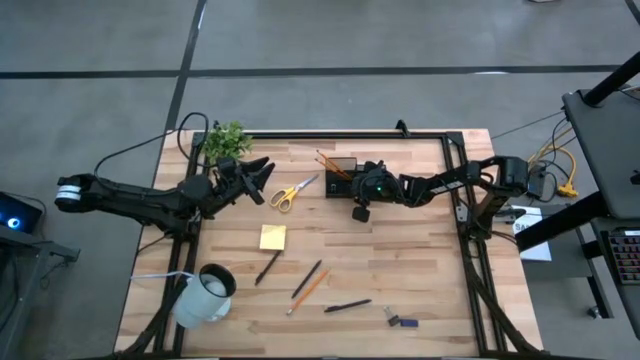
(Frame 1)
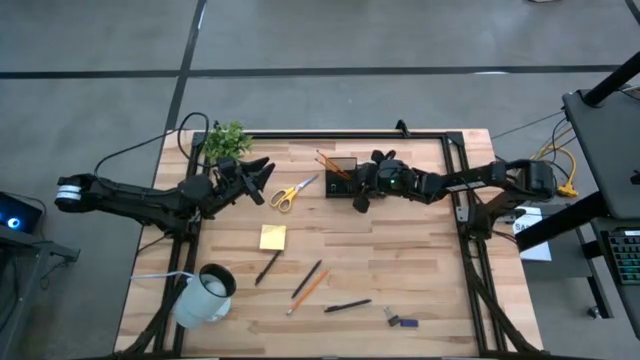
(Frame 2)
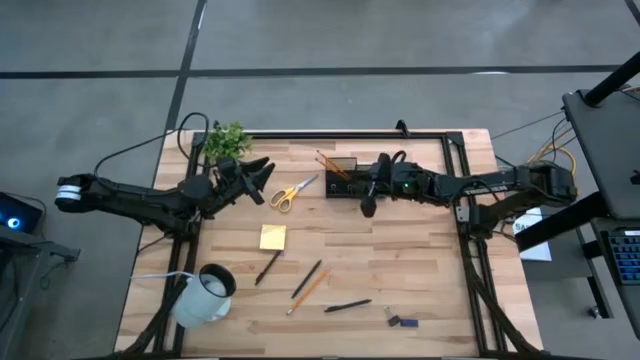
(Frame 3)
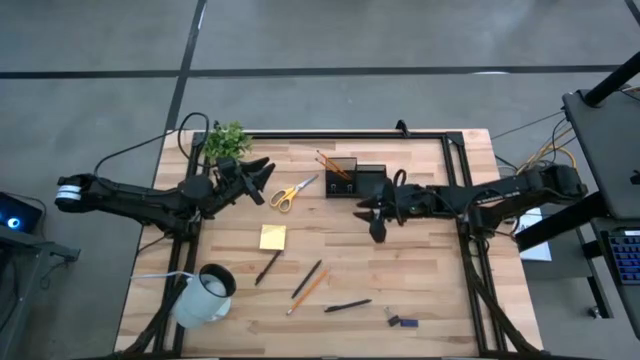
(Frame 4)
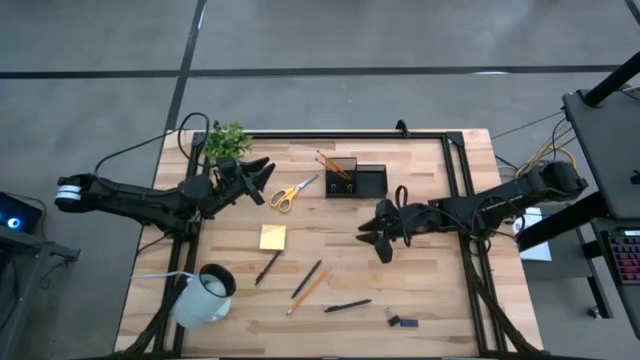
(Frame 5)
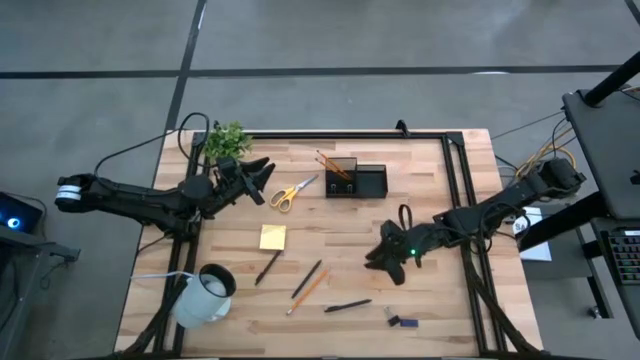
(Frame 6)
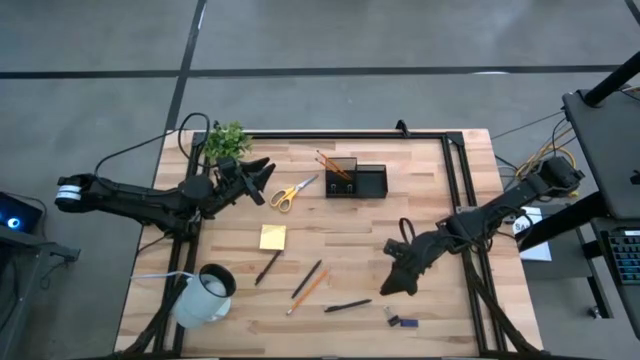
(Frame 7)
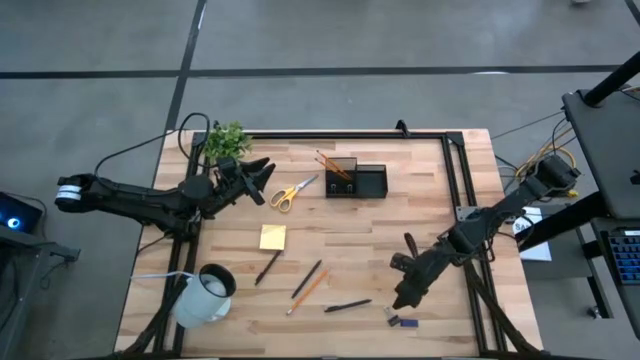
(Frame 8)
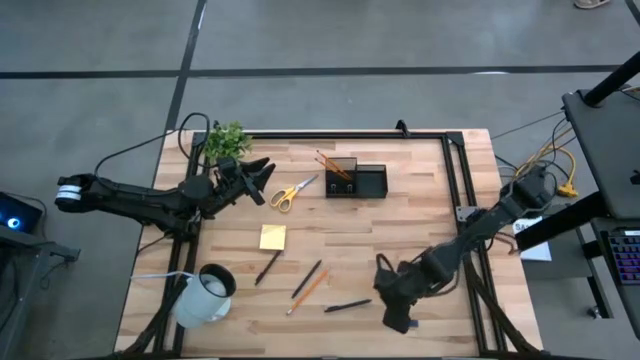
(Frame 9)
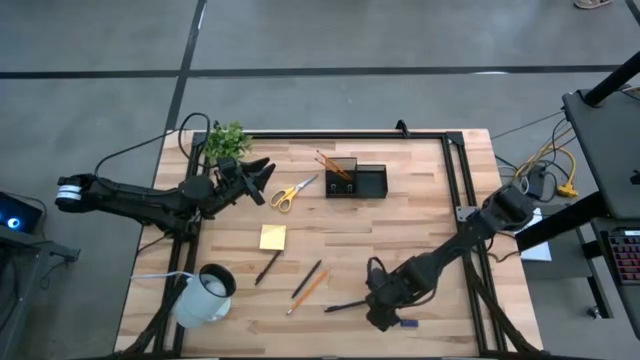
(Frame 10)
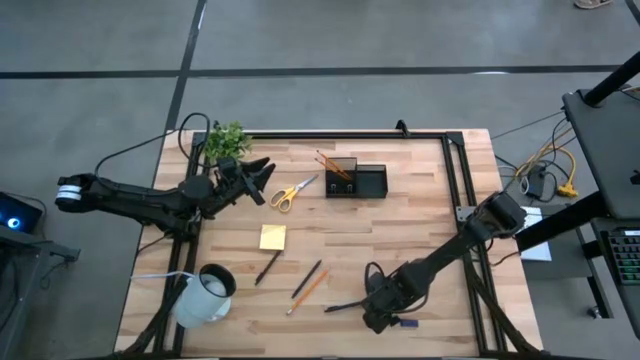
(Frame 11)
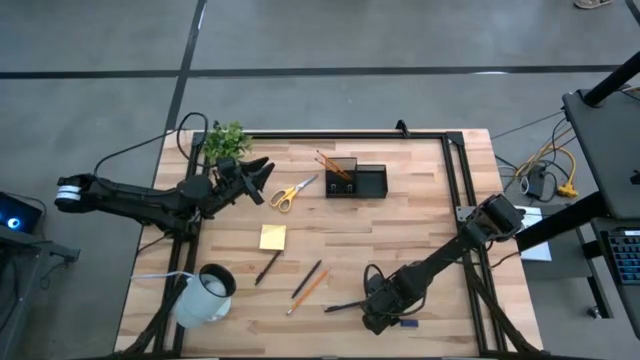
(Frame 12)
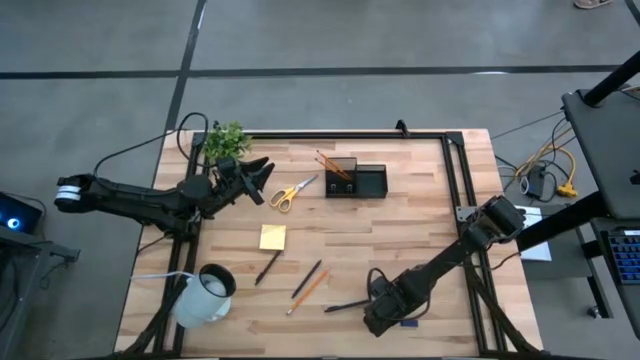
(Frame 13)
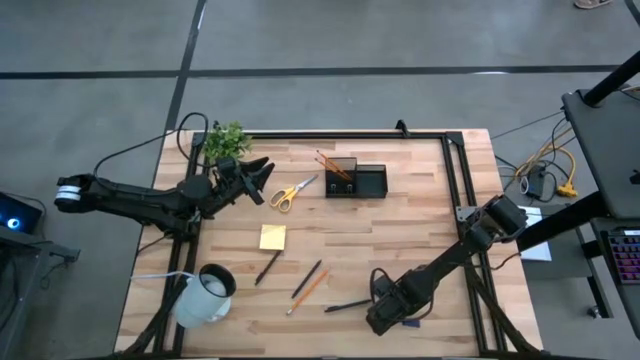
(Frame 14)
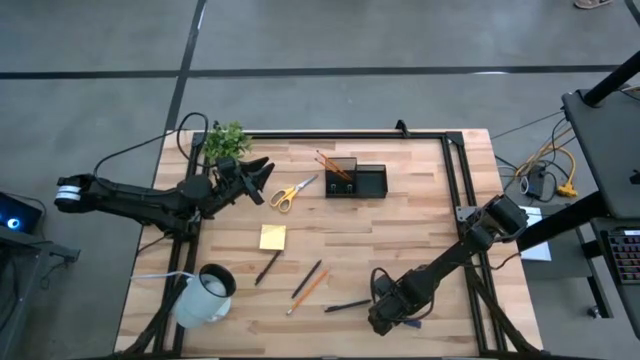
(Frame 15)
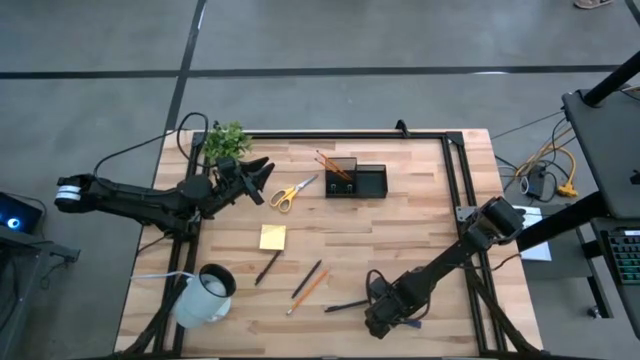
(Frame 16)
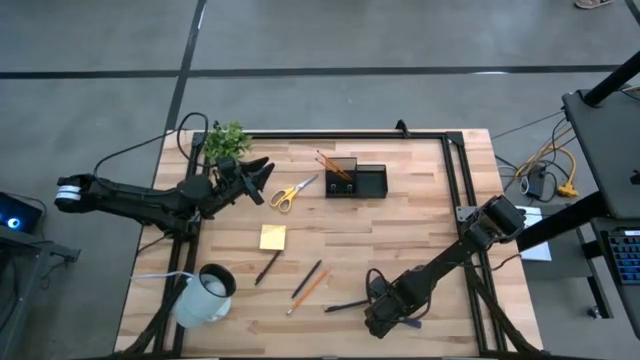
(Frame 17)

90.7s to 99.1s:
Task: Pick and place office supplies into organizer
Put the binder clip into the desk organizer

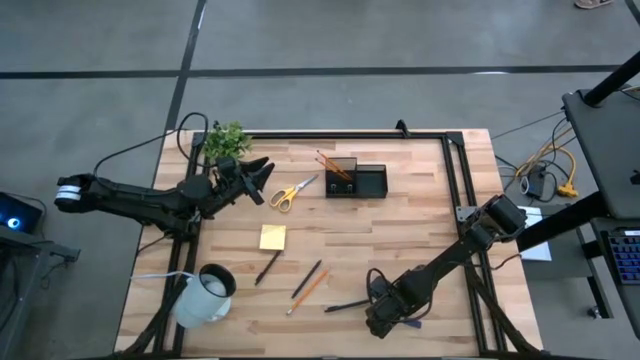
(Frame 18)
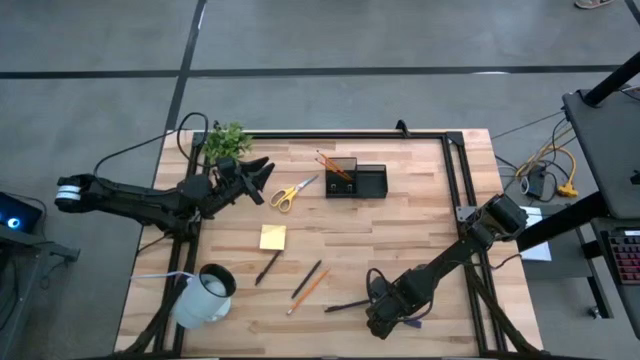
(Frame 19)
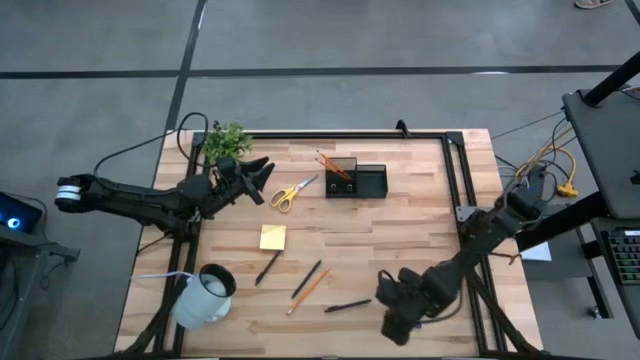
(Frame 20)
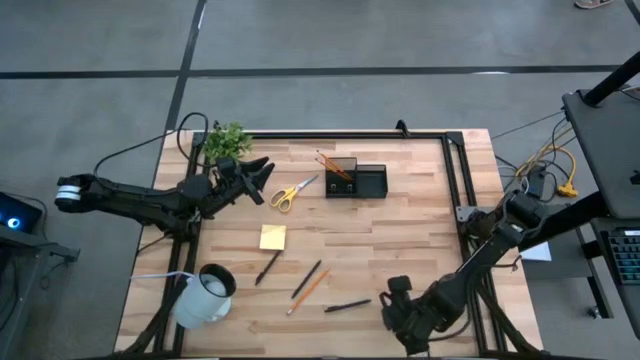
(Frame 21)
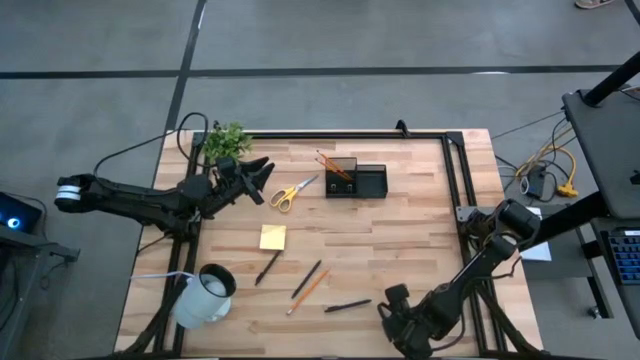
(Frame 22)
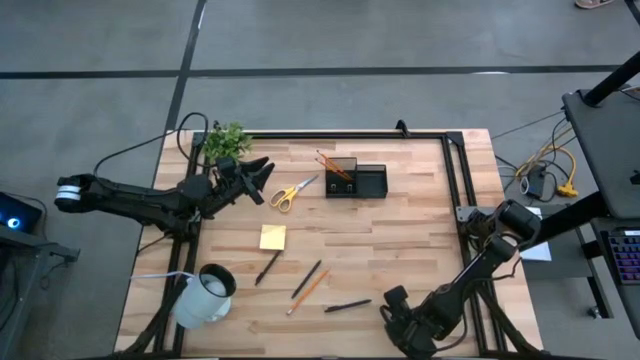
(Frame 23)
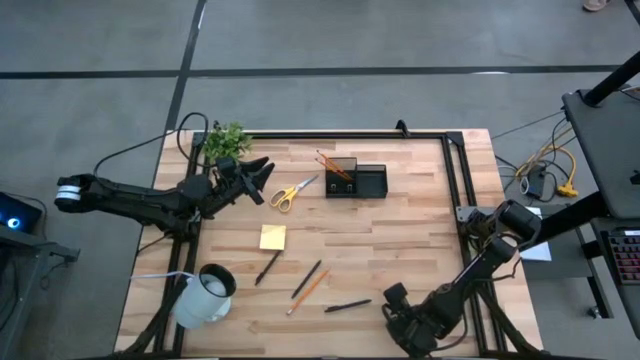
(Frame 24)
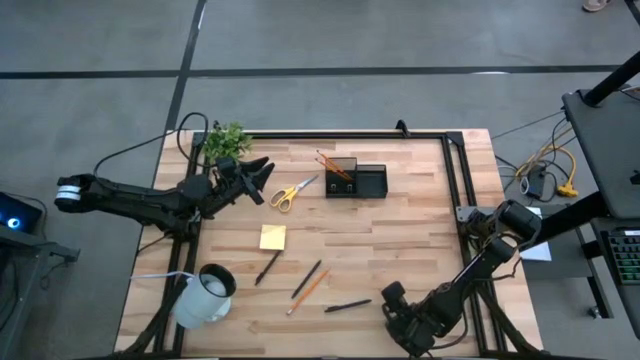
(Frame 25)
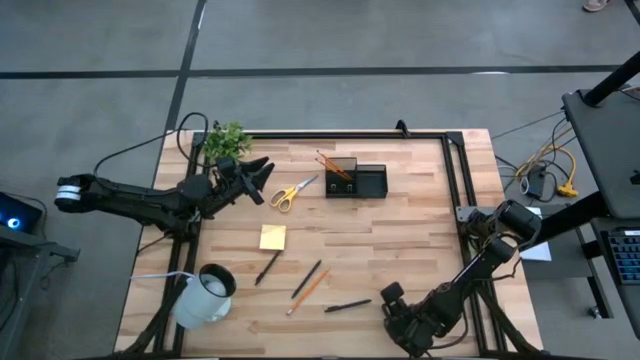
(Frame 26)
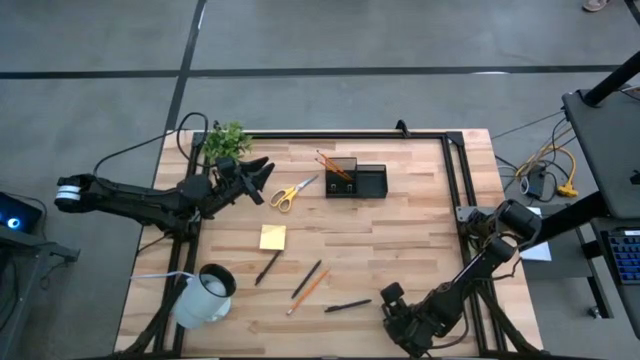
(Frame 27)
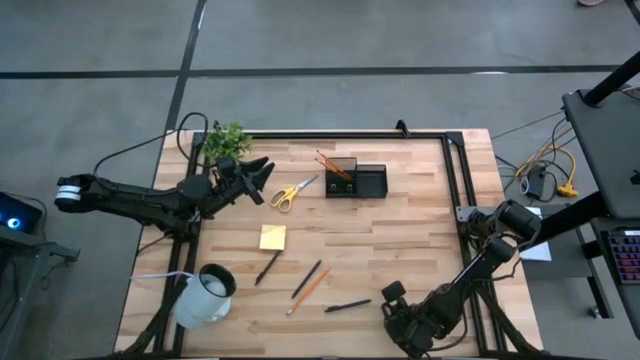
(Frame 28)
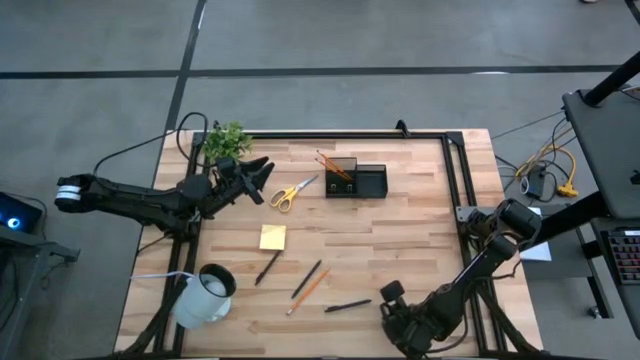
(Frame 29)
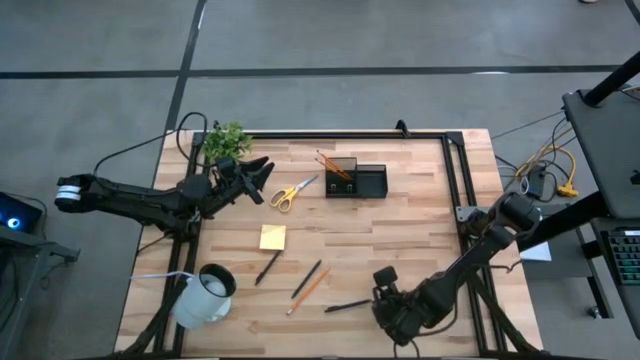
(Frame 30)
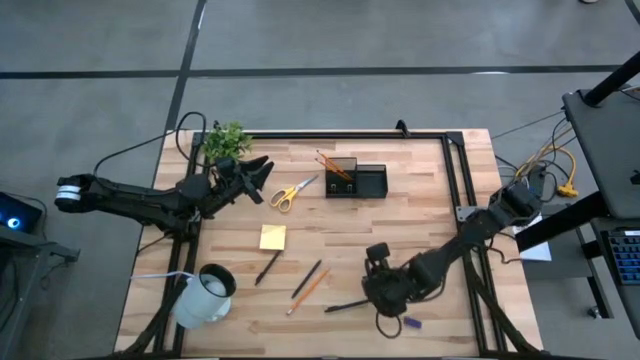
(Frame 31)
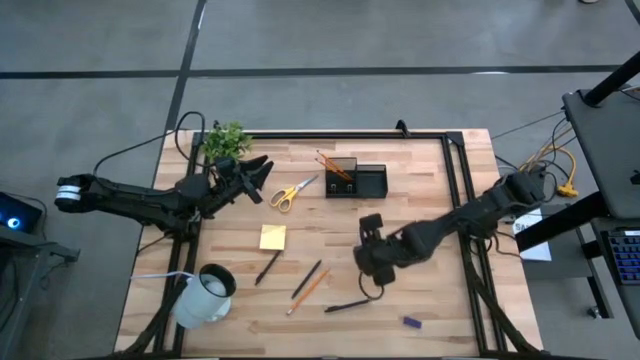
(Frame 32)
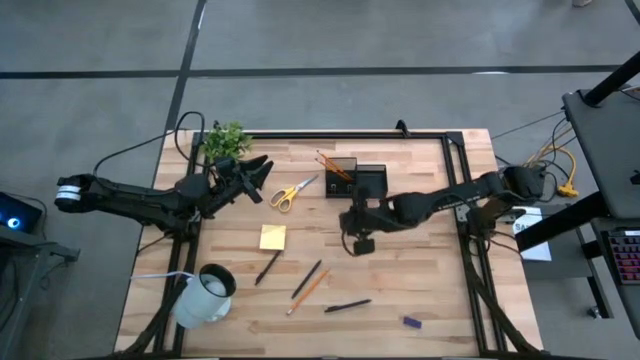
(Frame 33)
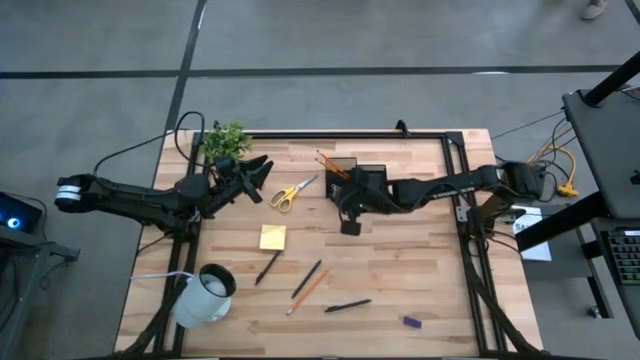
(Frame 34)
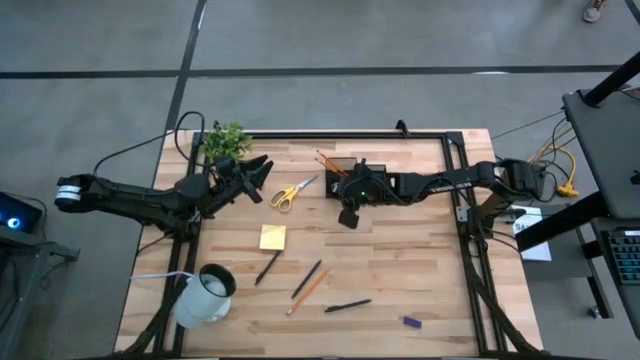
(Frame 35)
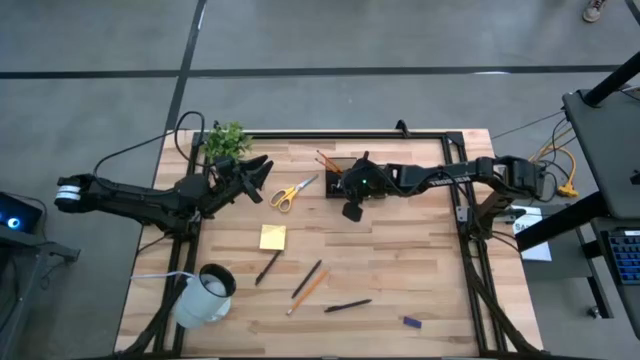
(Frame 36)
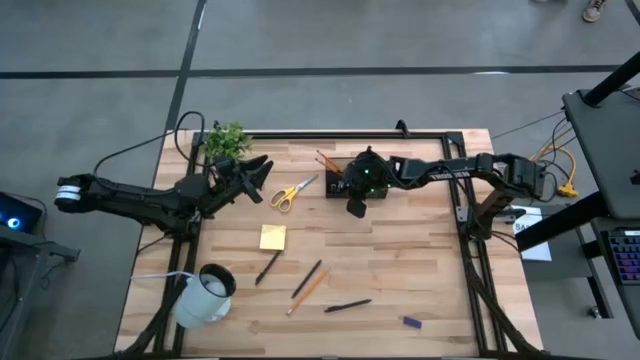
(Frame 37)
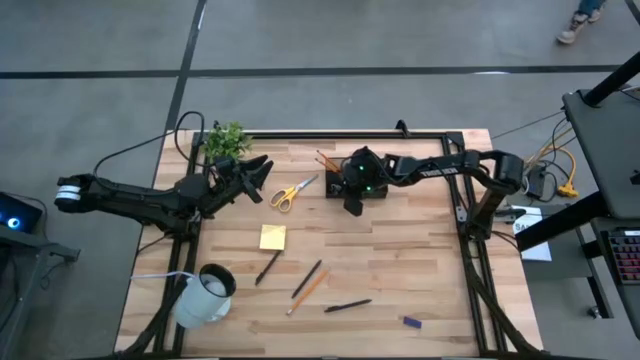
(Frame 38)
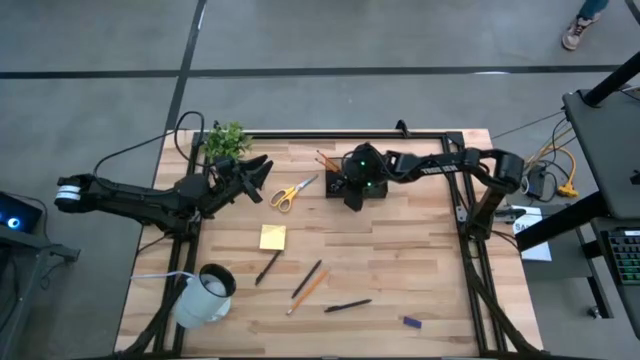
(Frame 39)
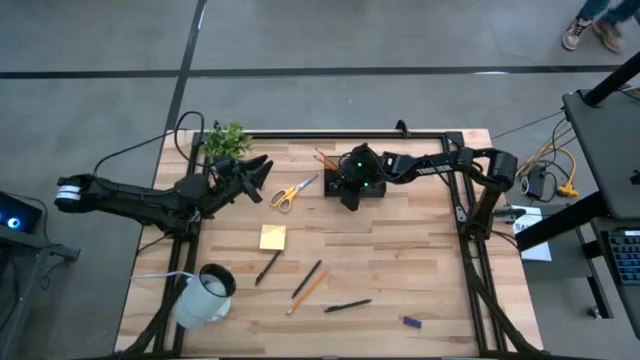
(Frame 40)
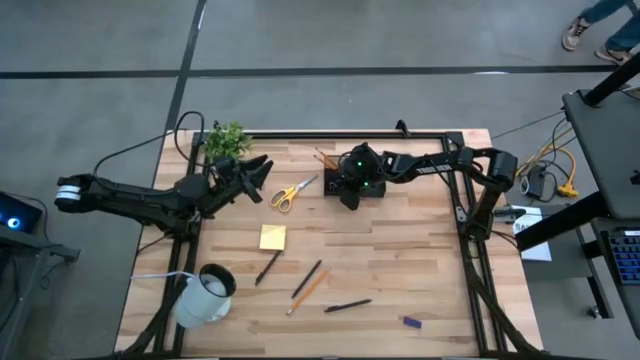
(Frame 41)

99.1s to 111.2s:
Put the binder clip into the desk organizer
